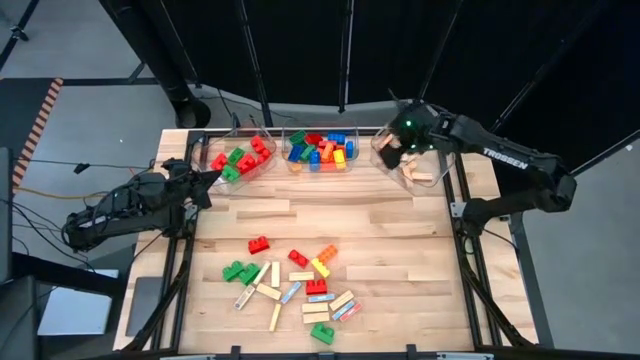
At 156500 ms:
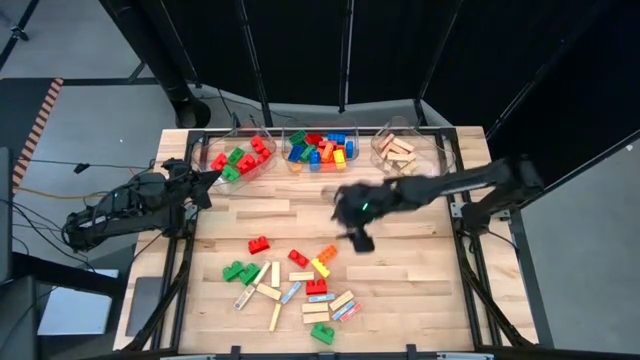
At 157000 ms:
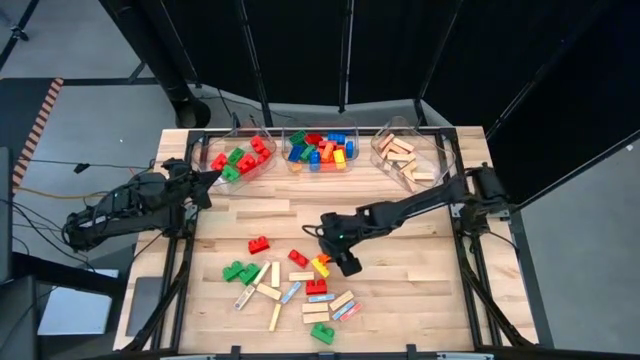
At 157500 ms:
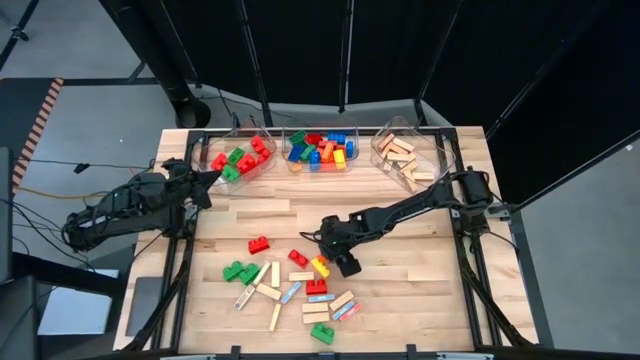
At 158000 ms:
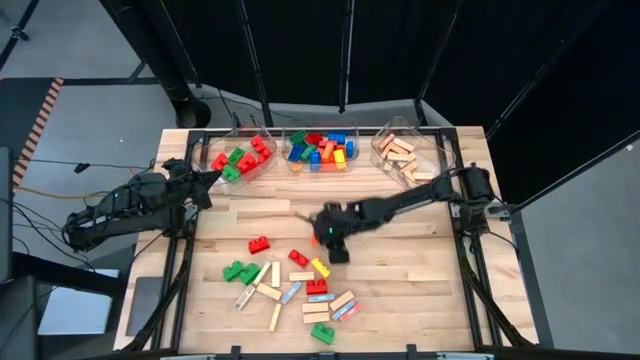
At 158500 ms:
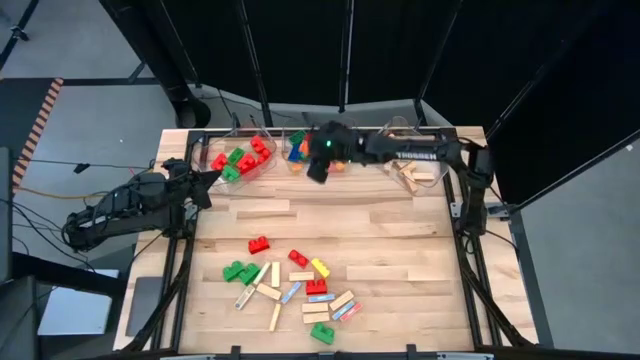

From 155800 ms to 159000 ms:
Task: Sort blocks by size
Put the large orange game piece into the middle transparent bin

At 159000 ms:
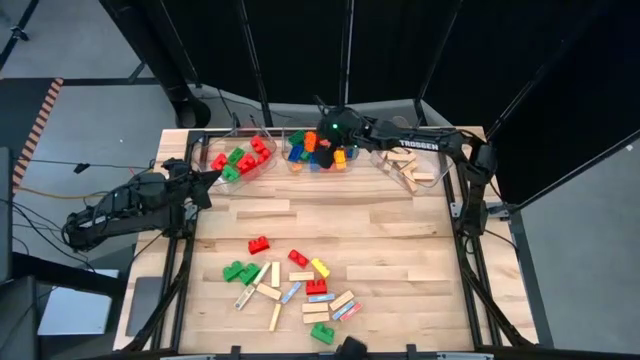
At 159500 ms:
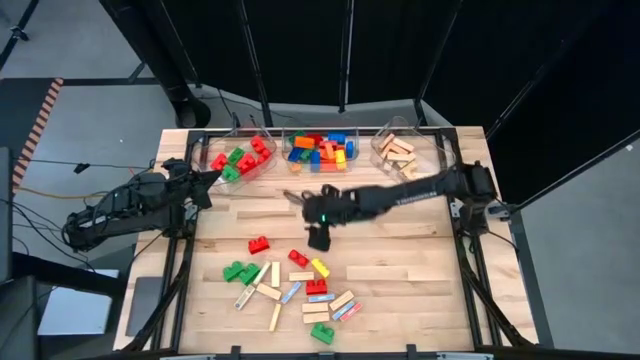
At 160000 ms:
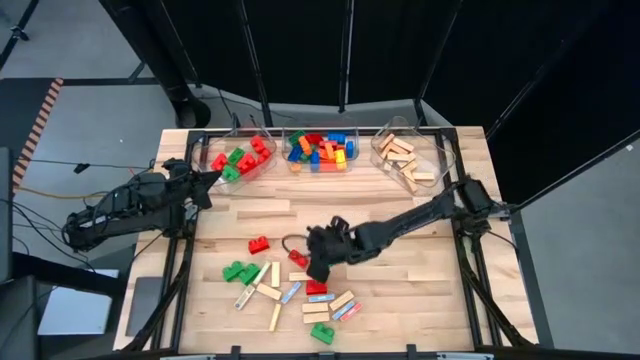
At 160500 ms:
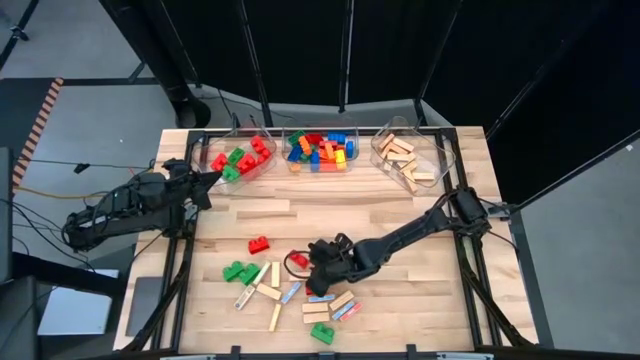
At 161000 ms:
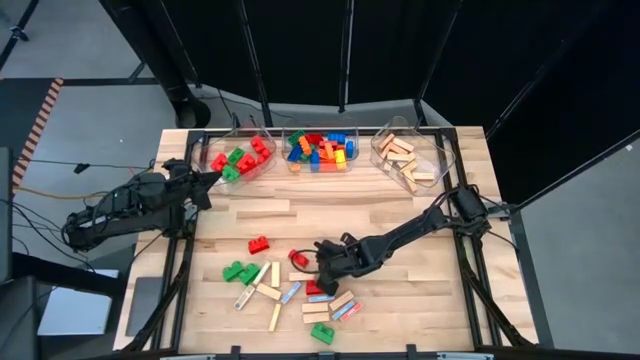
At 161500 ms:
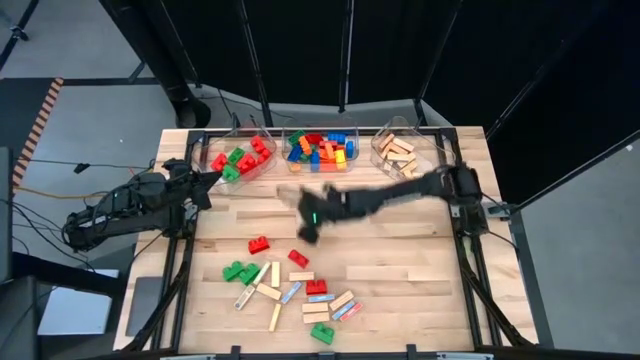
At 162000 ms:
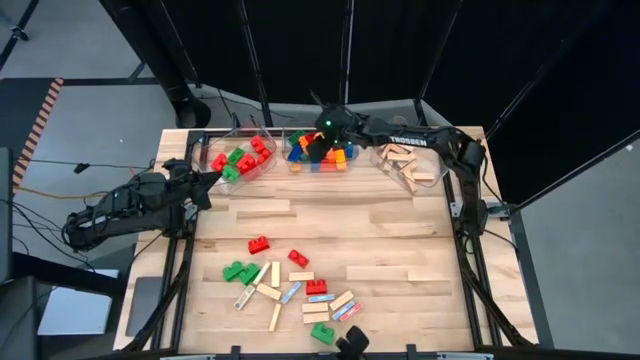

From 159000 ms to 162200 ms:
Put the large yellow game piece into the middle transparent bin

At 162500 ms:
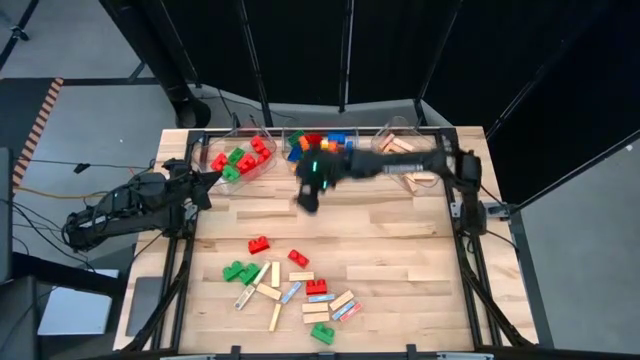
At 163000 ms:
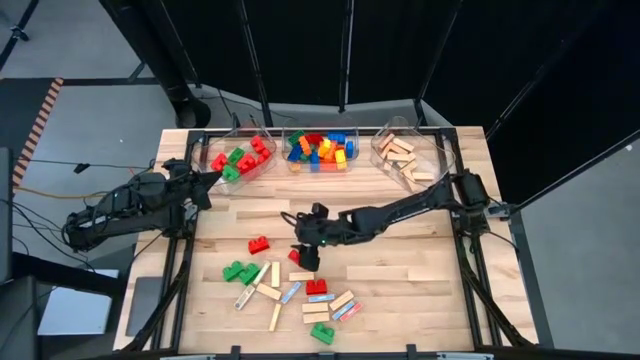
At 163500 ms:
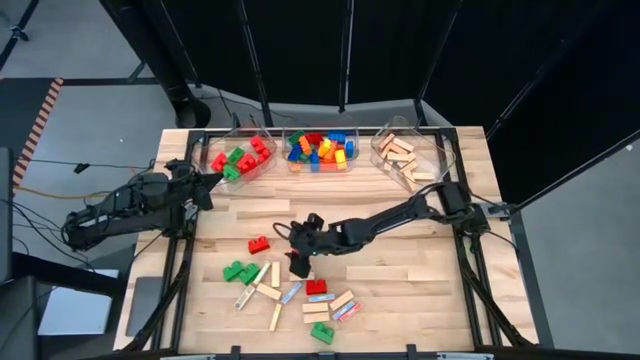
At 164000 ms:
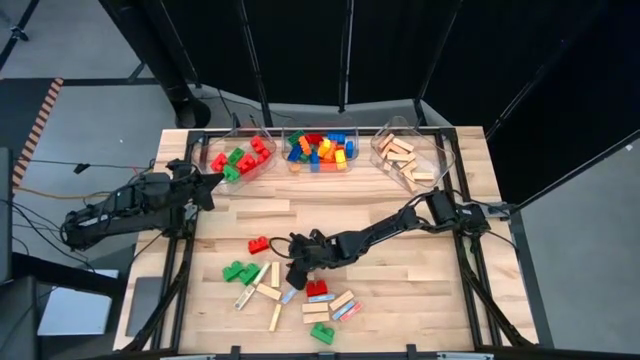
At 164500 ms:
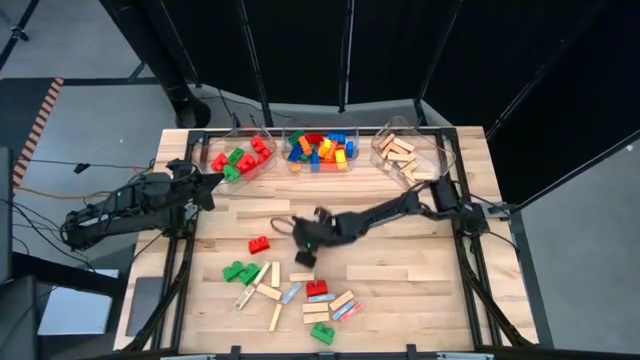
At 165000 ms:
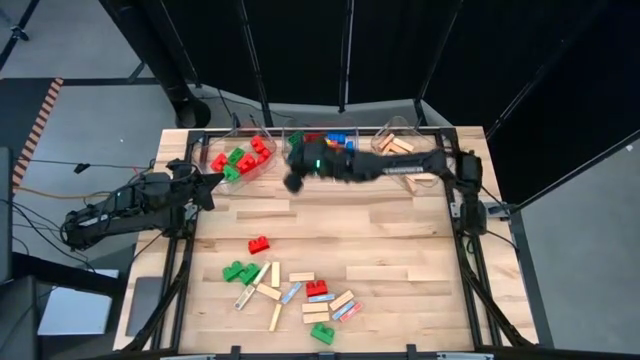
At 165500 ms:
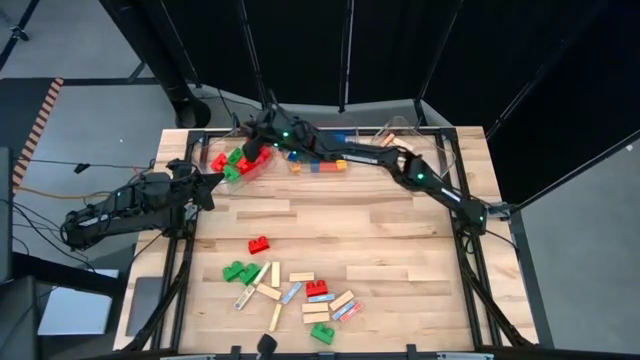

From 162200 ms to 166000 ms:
Put the small red game piece into the left transparent bin

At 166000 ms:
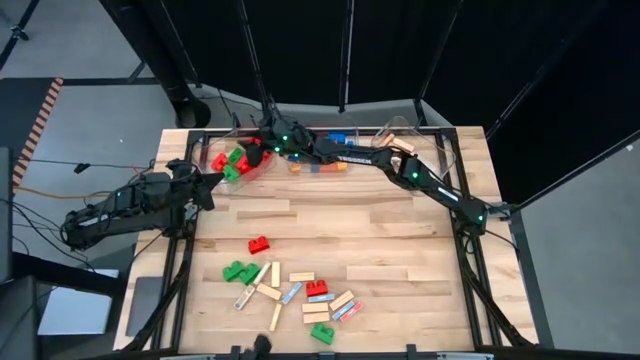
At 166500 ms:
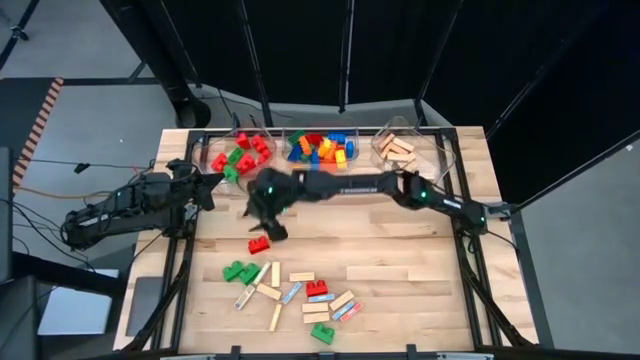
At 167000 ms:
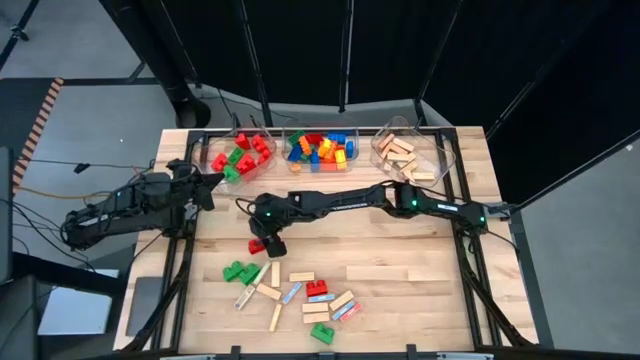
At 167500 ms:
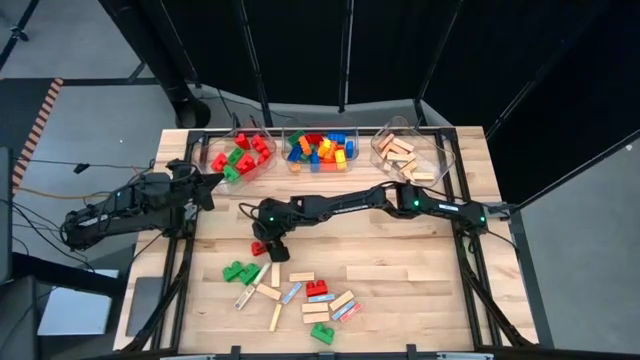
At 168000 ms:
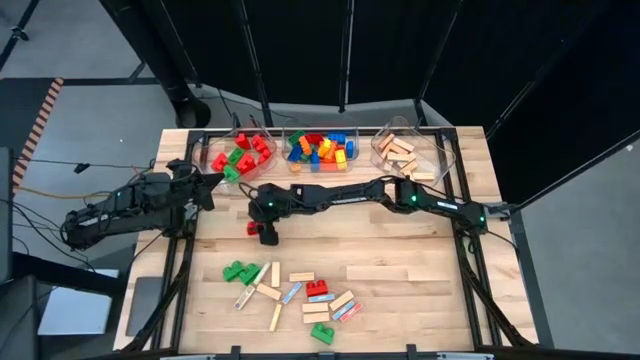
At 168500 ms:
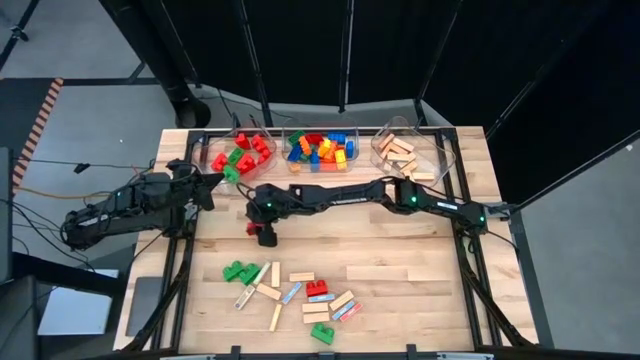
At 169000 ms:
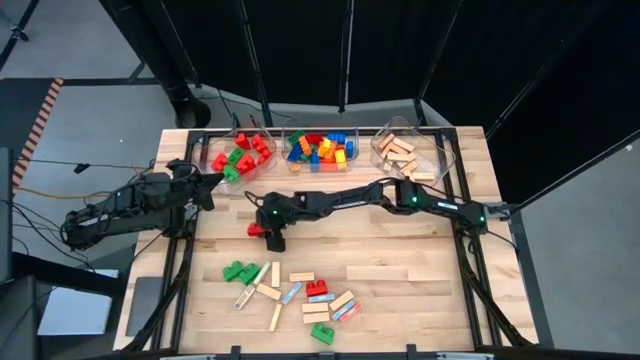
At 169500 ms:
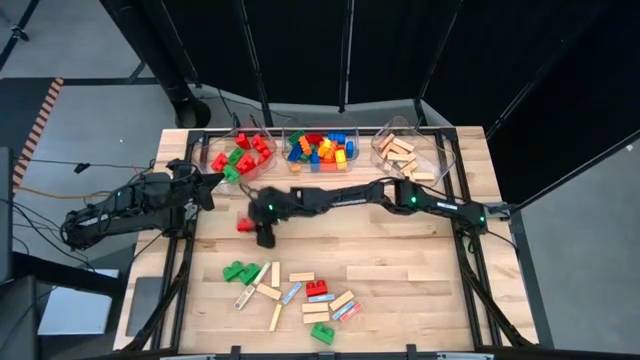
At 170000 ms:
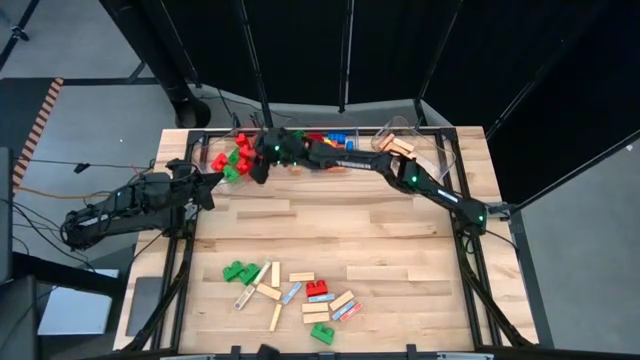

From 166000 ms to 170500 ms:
Put the small red game game piece into the left transparent bin

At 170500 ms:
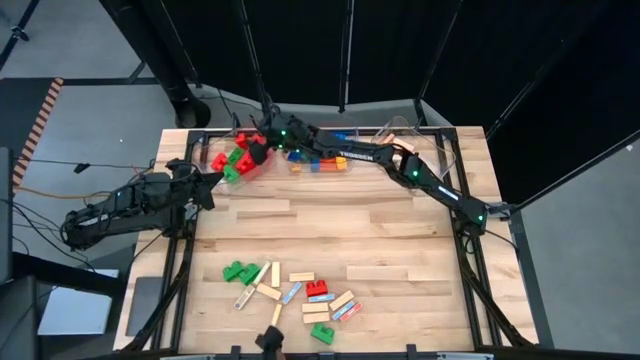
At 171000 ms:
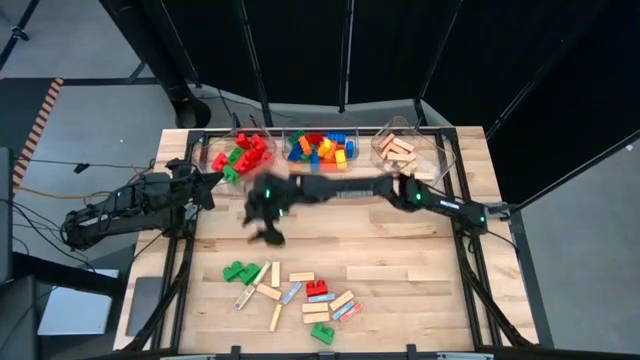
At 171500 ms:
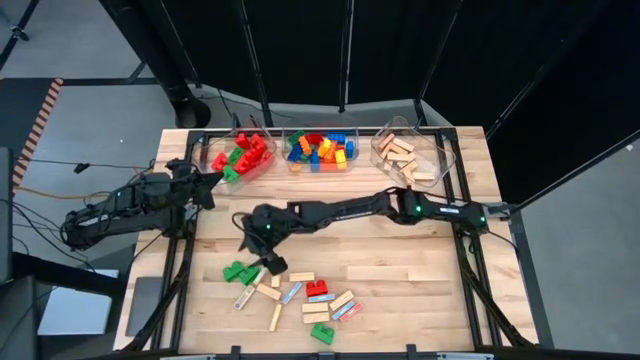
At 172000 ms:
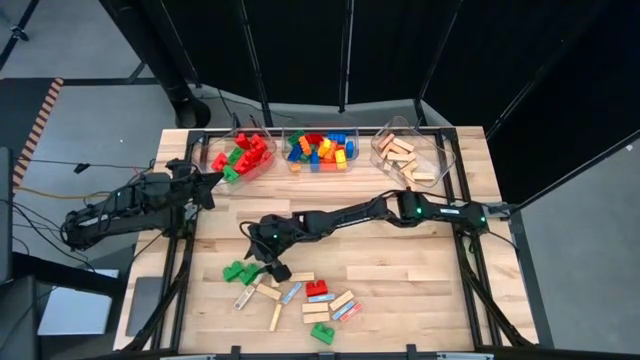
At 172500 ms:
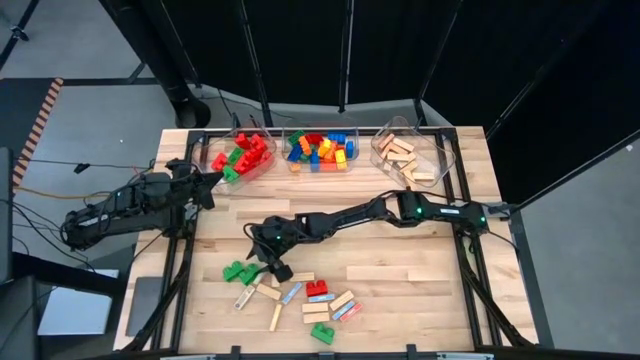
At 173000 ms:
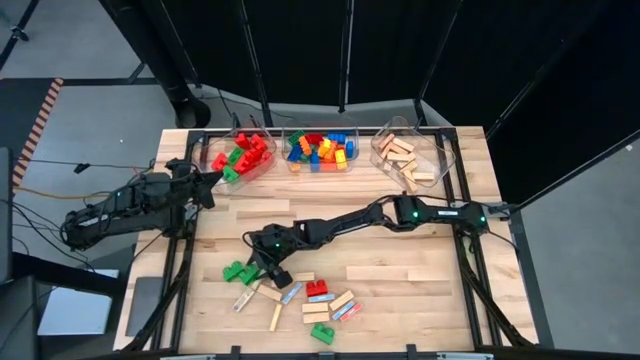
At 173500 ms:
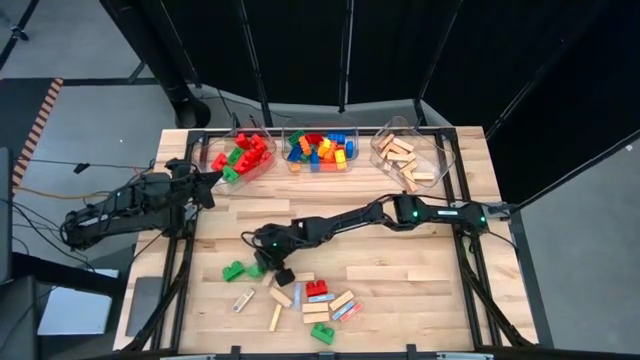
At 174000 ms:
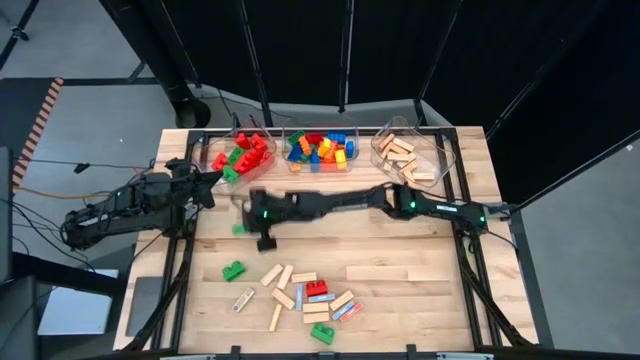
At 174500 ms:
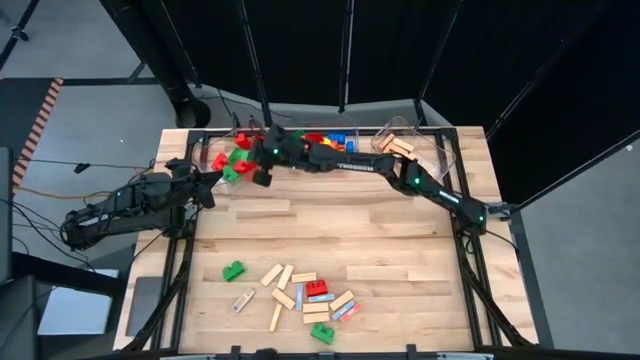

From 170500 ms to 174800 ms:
Put the small green game piece into the left transparent bin

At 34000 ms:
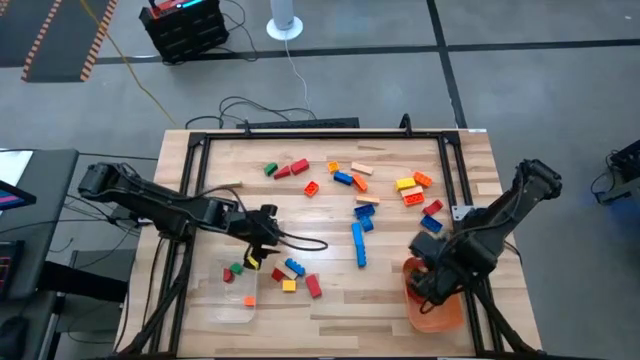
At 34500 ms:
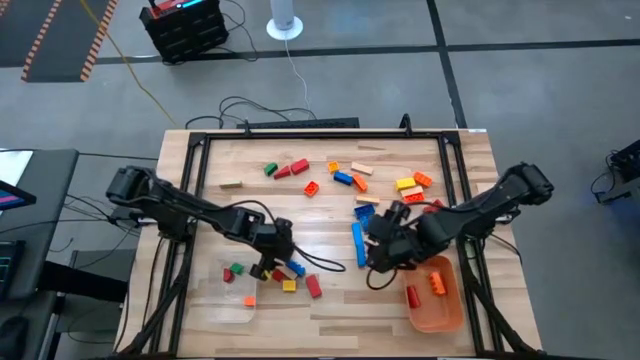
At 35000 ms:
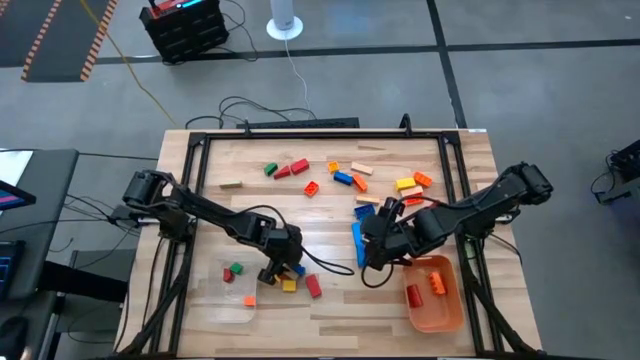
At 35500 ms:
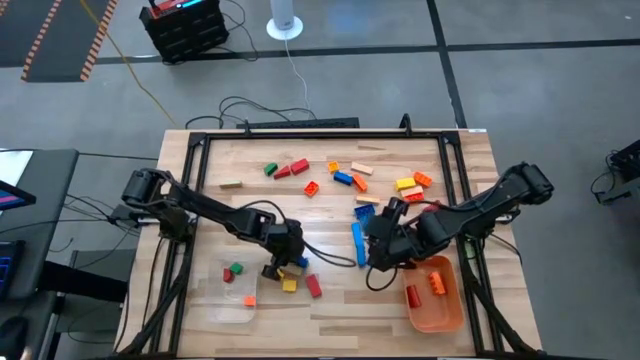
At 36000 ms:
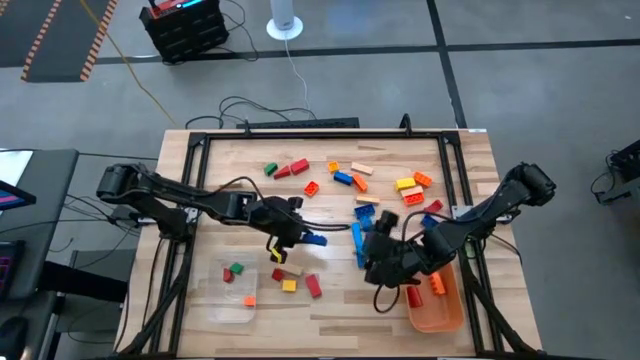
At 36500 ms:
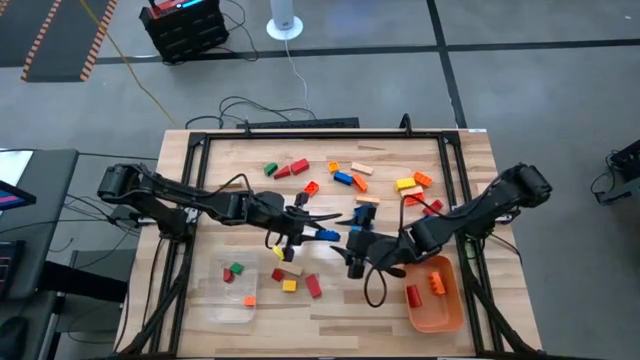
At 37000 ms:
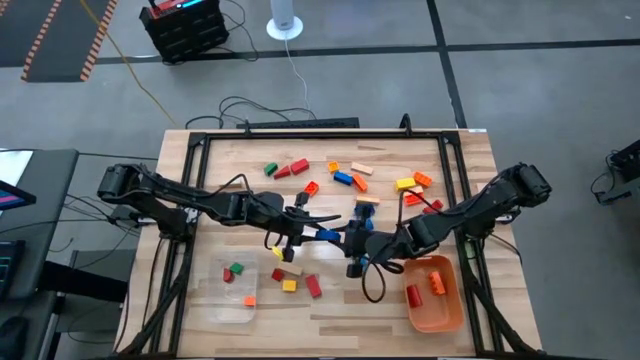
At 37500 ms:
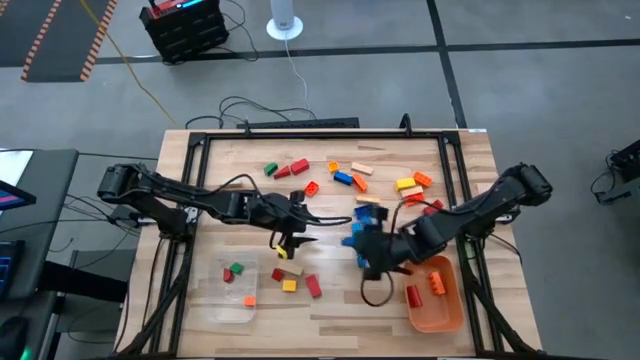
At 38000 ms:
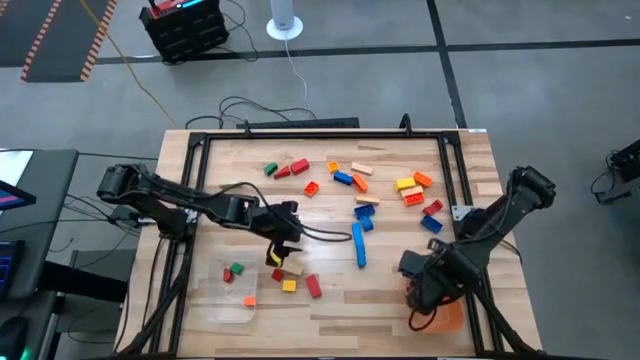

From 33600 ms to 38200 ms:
Task: Sort blocks by size
Put the large blue game piece into the transparent bin
